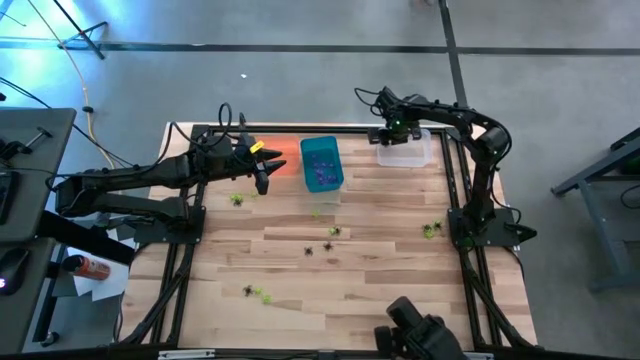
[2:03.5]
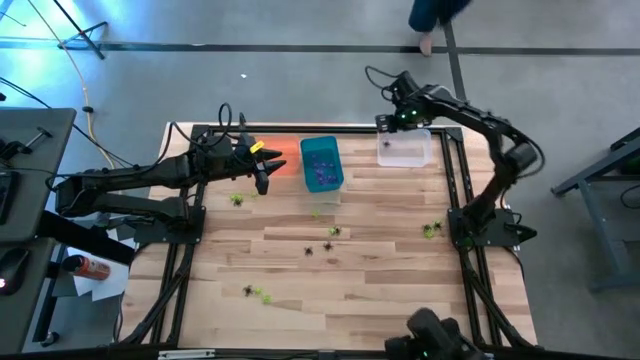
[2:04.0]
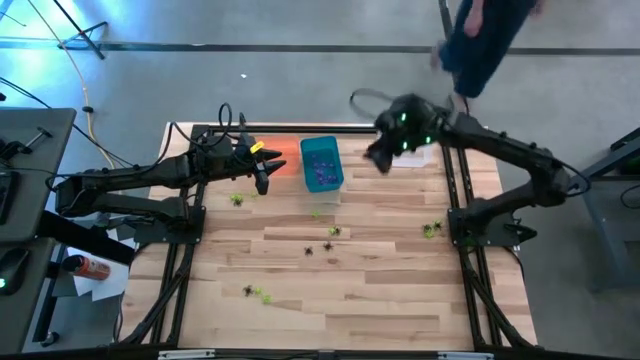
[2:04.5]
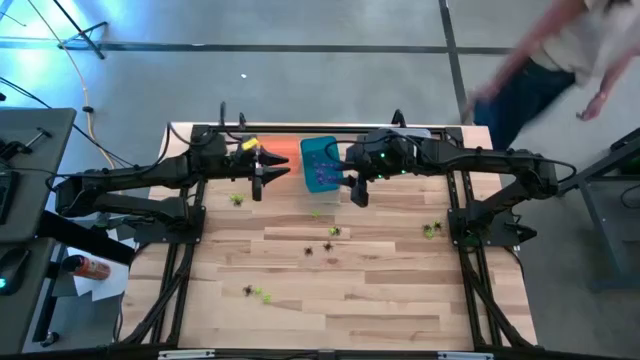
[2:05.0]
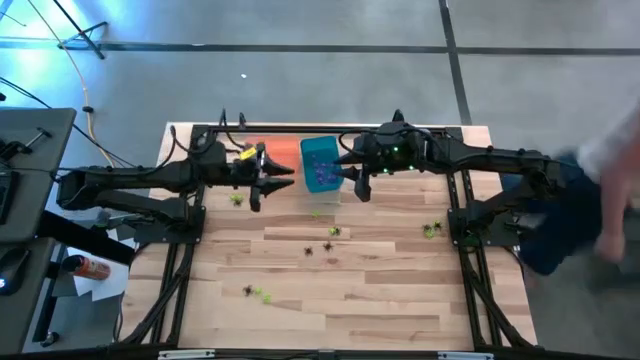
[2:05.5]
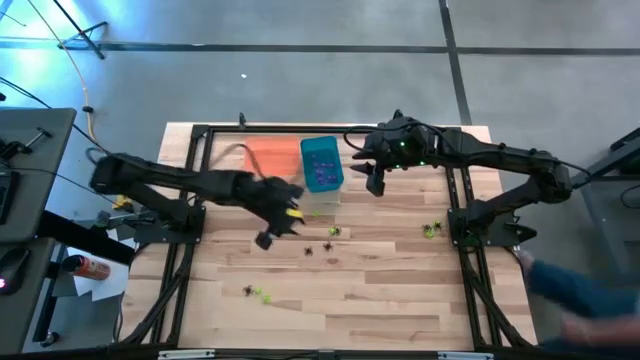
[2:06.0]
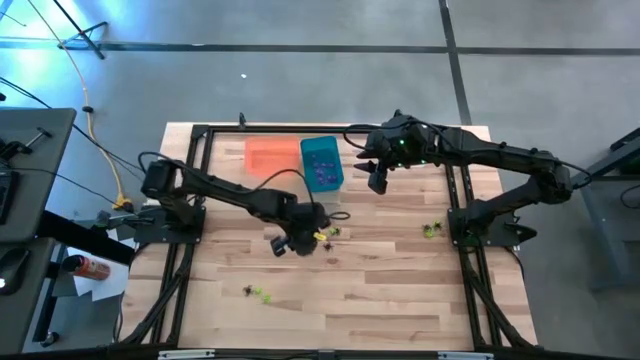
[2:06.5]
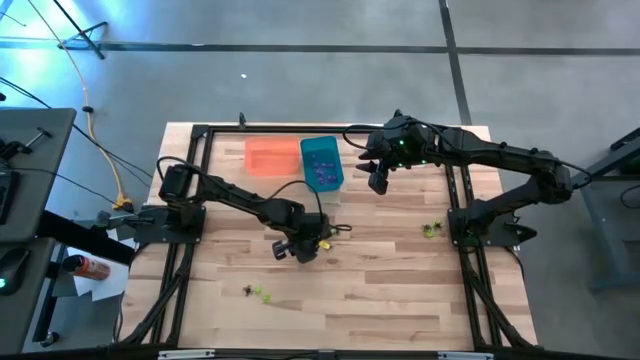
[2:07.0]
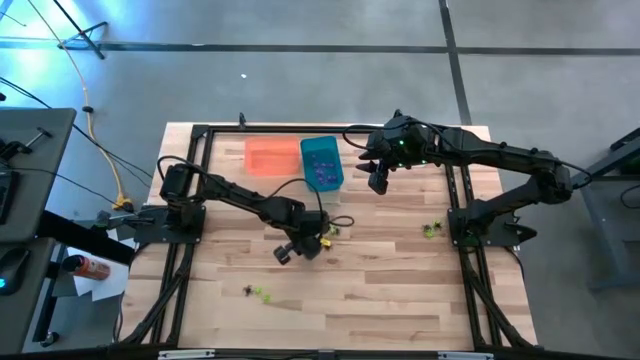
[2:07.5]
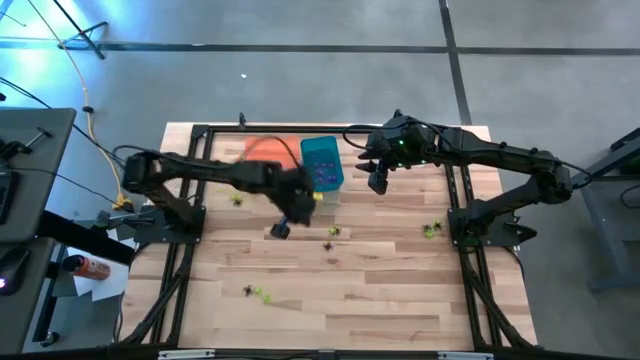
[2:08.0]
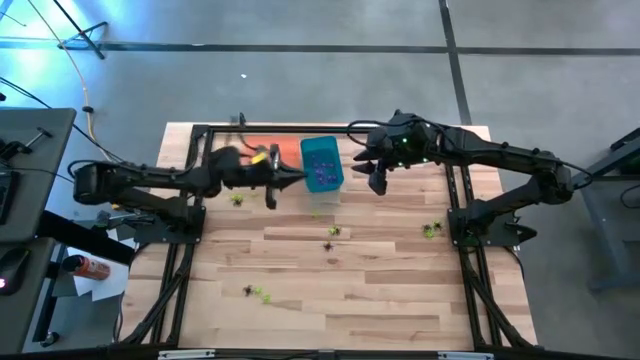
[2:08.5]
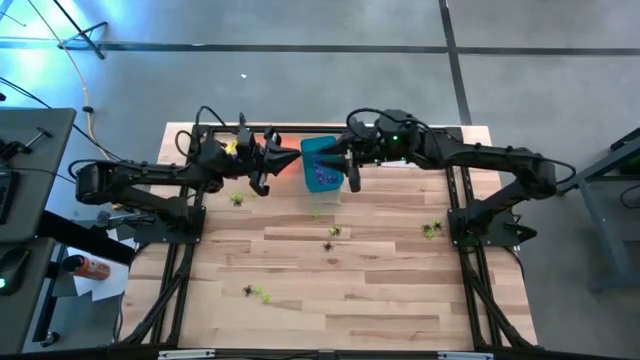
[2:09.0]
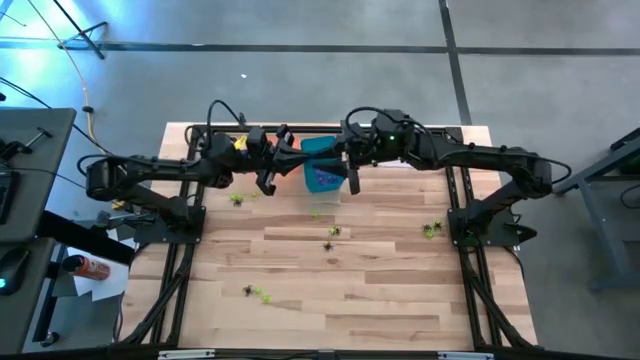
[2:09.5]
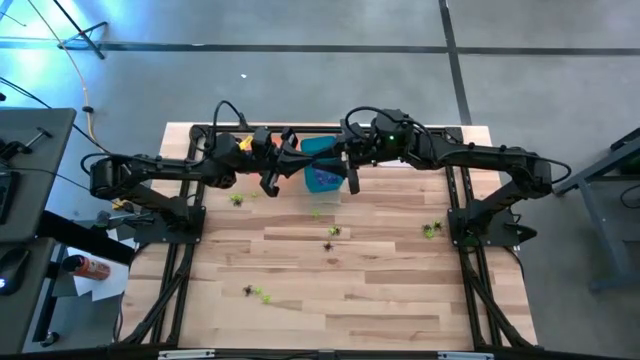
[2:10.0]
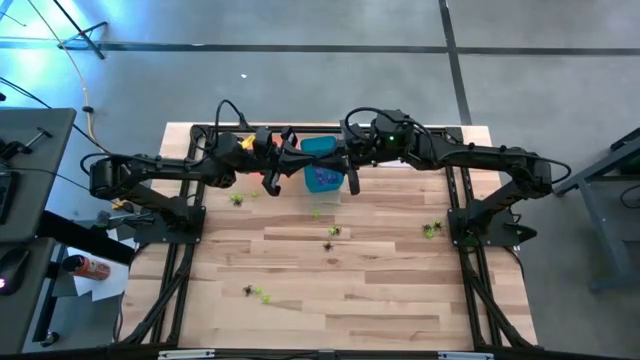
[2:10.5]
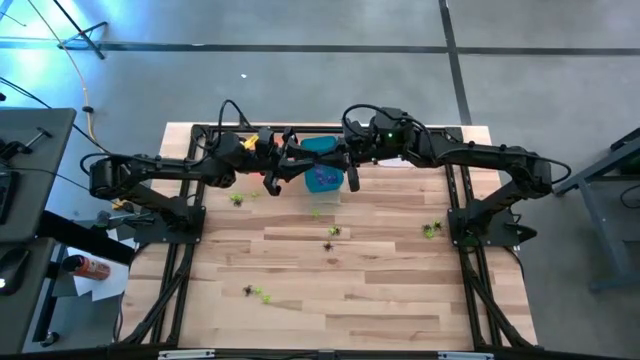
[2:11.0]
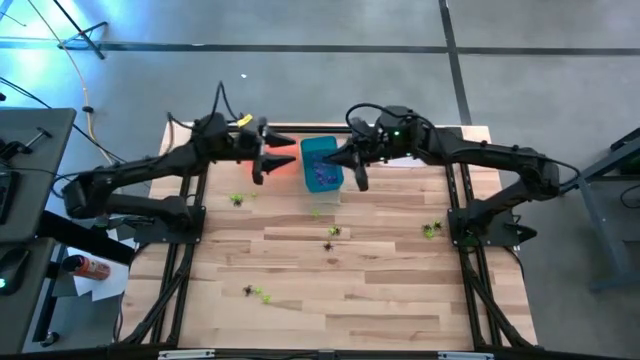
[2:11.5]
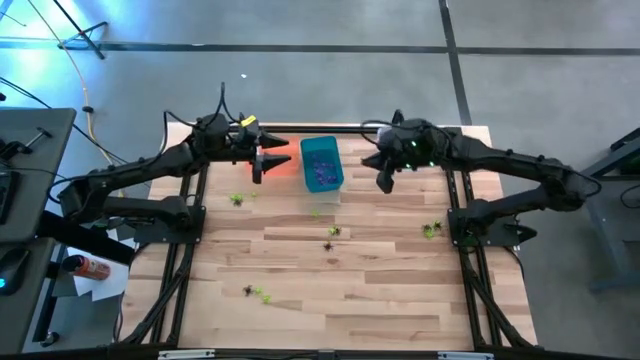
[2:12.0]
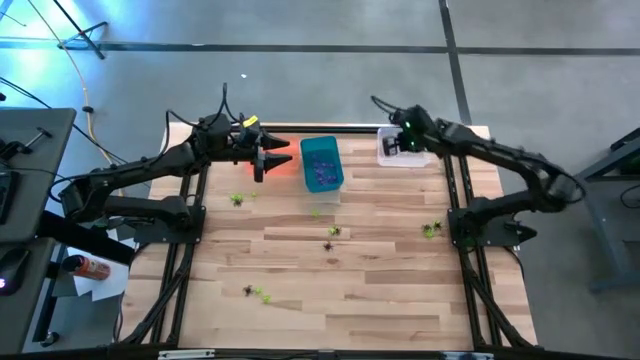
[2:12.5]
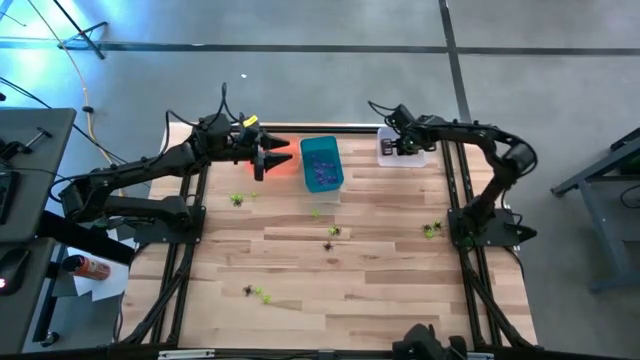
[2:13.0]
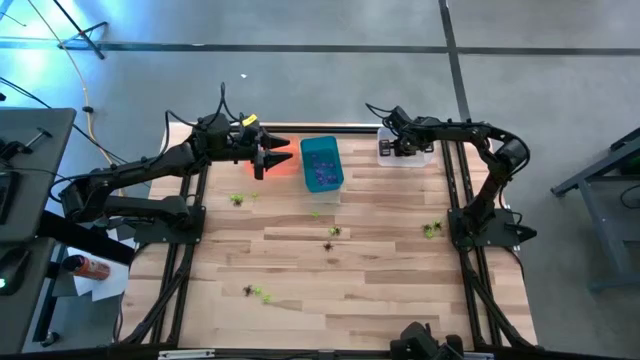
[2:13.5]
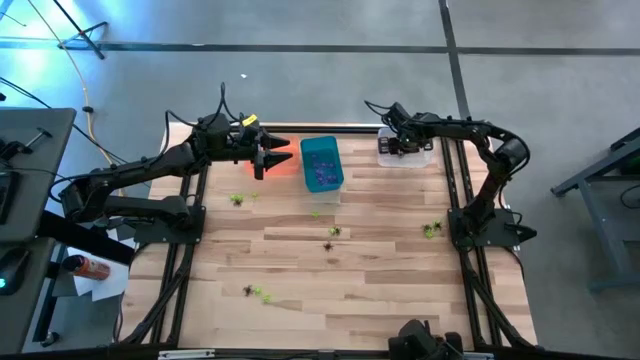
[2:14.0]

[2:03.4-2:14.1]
Task: Sort Halloween decoration
Put the black spider toy into the transparent bin

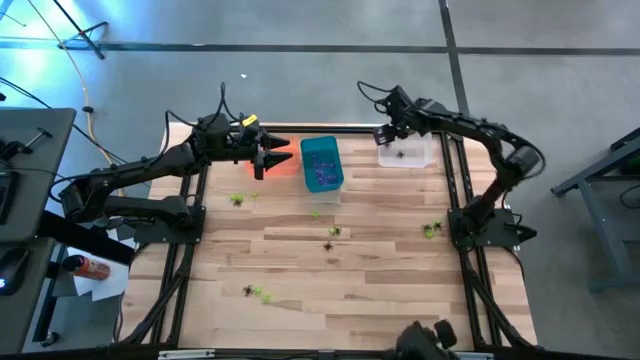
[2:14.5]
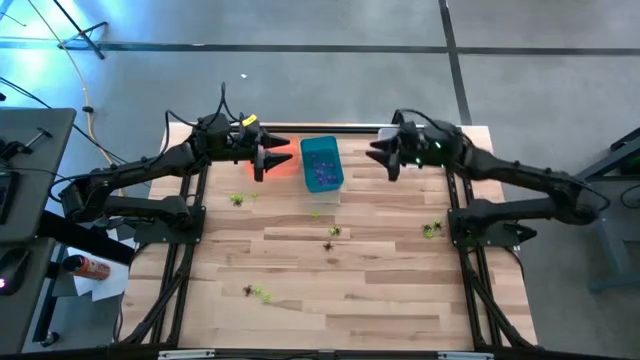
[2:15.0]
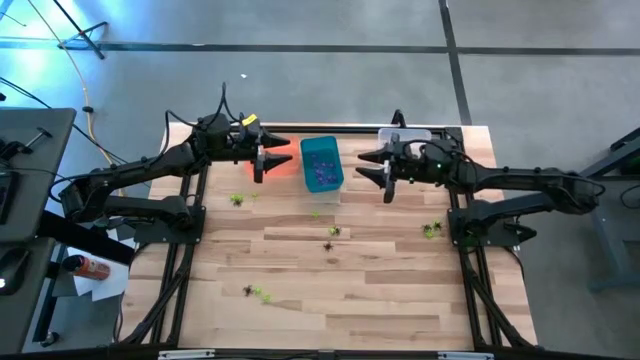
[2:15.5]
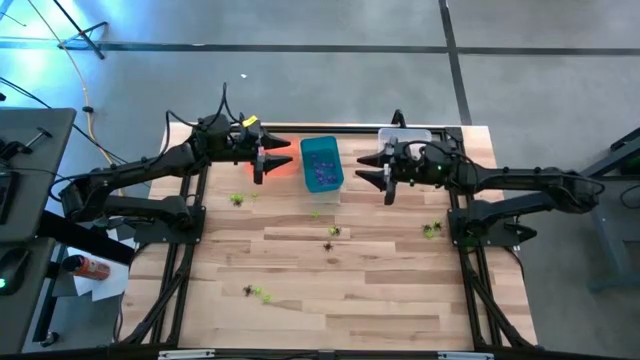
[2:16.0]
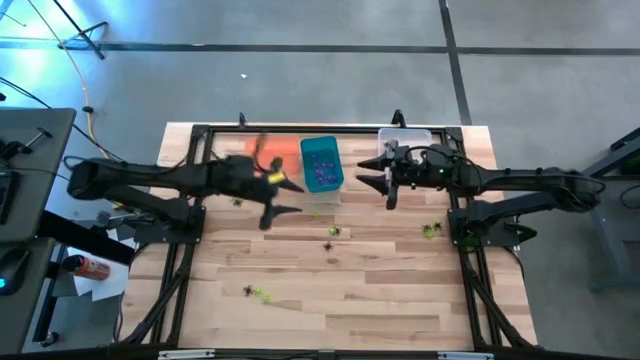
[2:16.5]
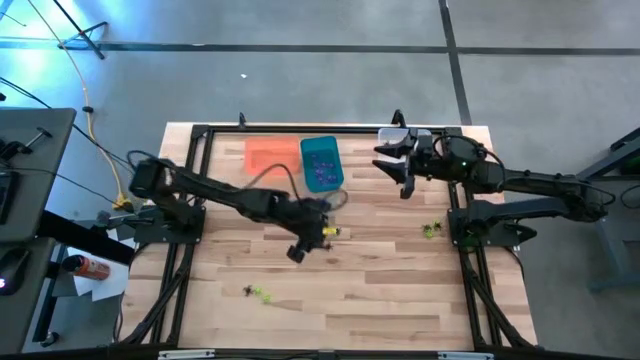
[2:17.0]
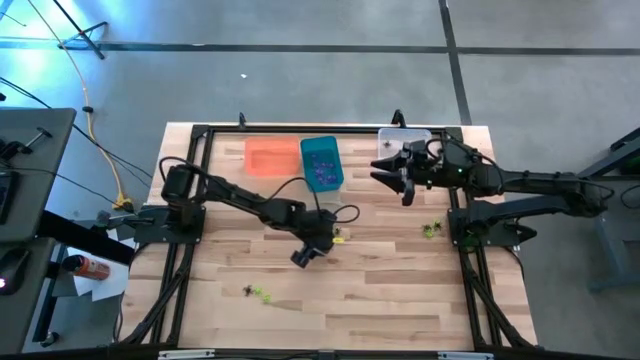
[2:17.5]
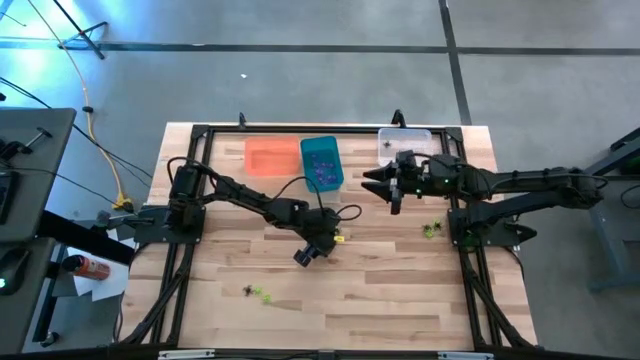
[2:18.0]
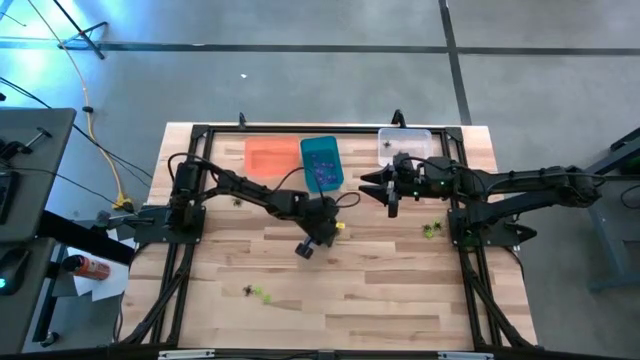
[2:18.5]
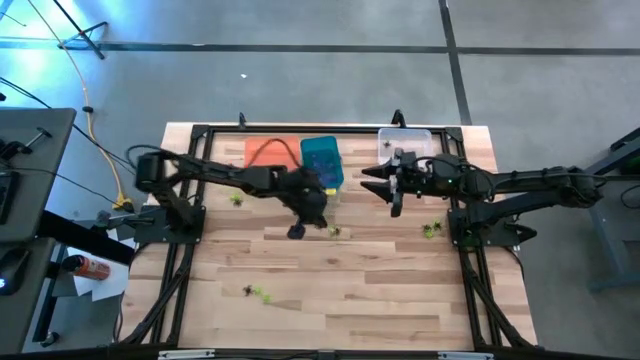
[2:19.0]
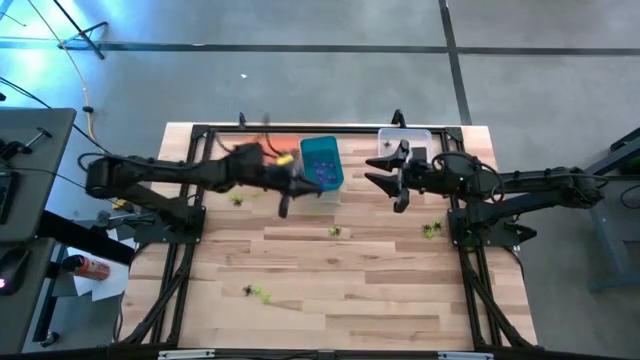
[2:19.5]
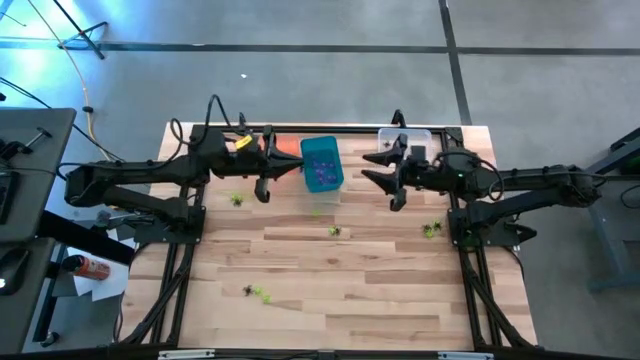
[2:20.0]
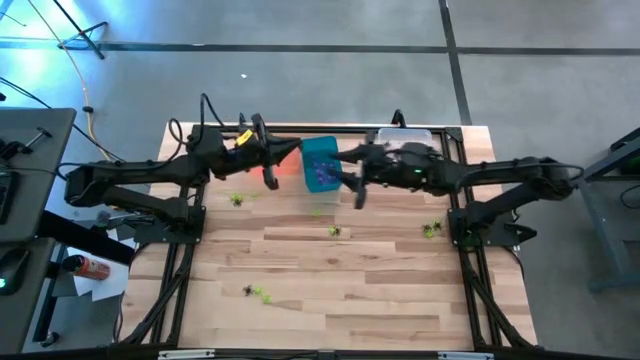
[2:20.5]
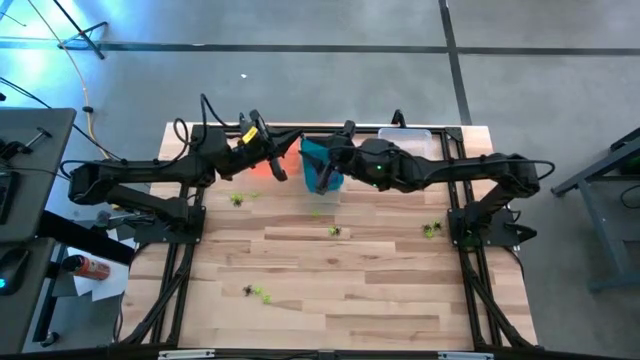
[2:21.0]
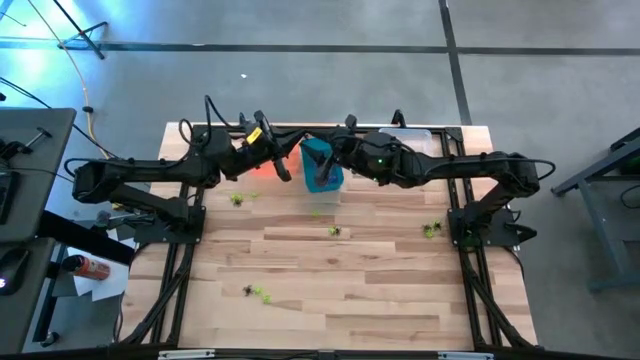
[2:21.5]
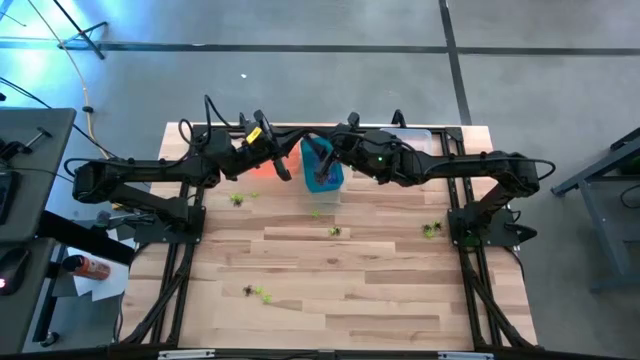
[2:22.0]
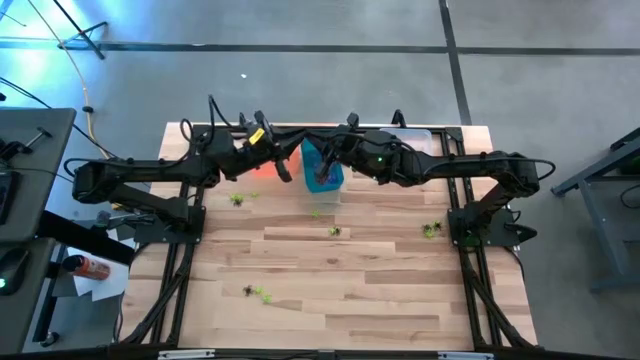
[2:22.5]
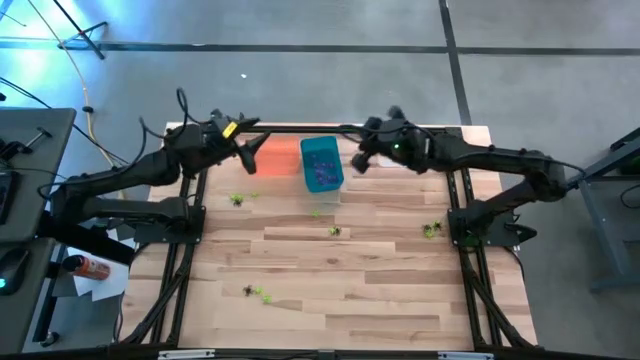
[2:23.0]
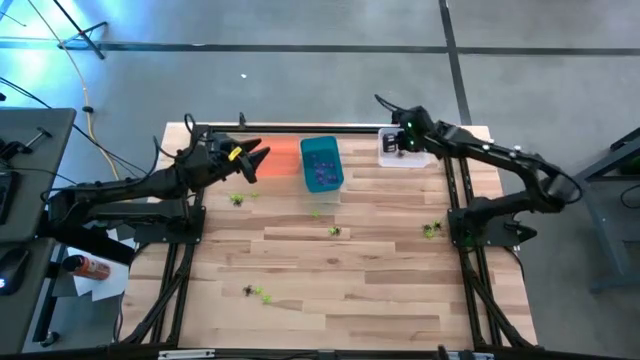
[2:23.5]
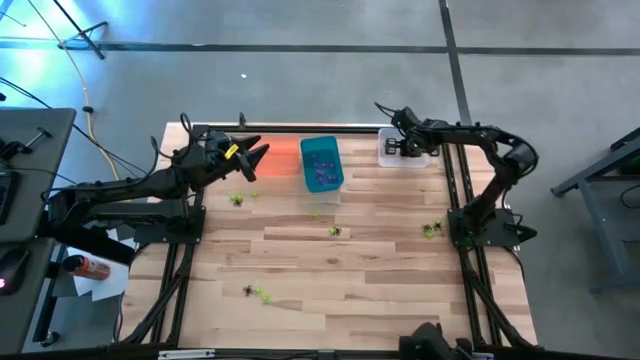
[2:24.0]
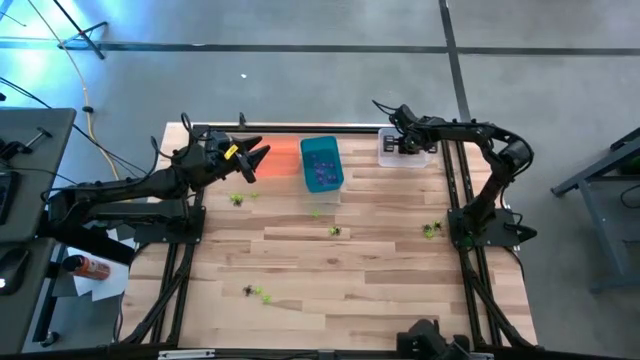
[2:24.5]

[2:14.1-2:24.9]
Put the black spider toy into the transparent bin
